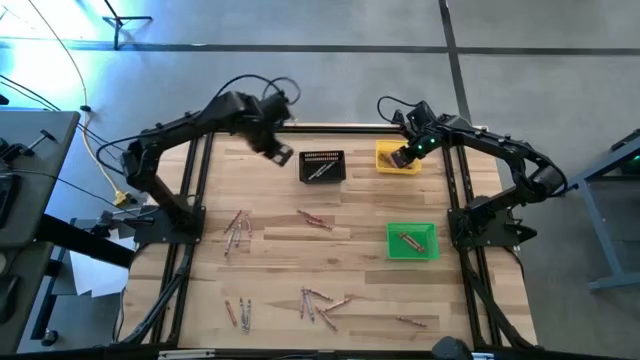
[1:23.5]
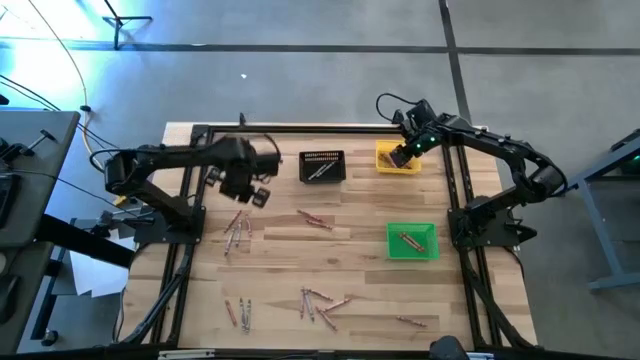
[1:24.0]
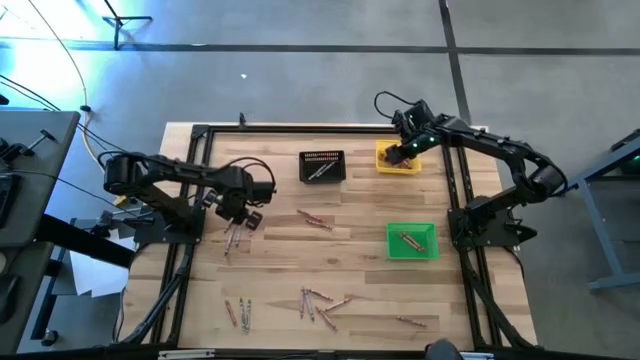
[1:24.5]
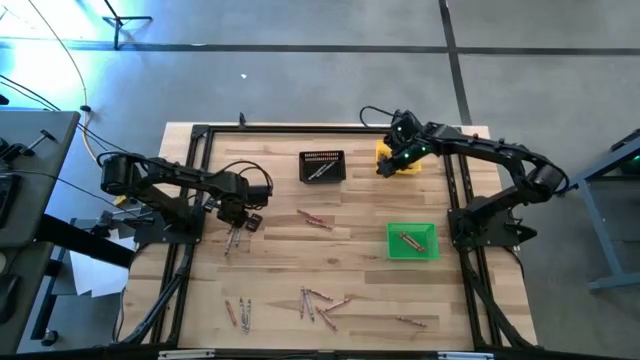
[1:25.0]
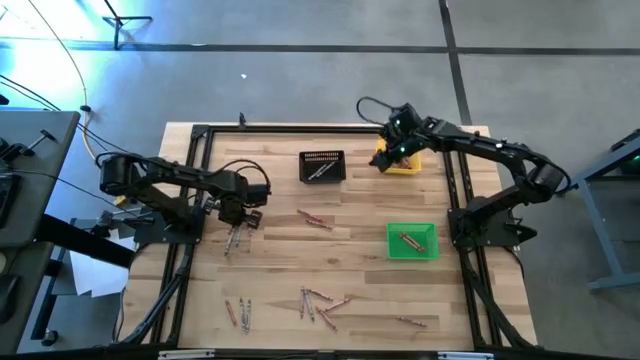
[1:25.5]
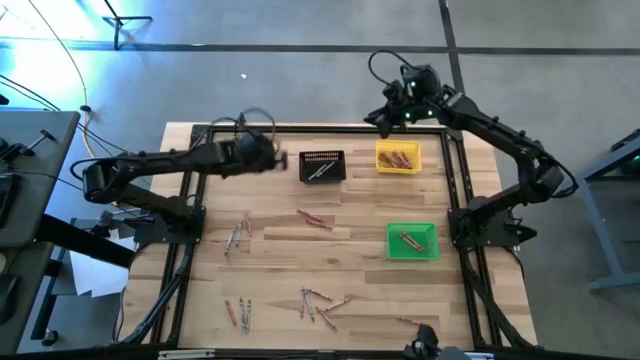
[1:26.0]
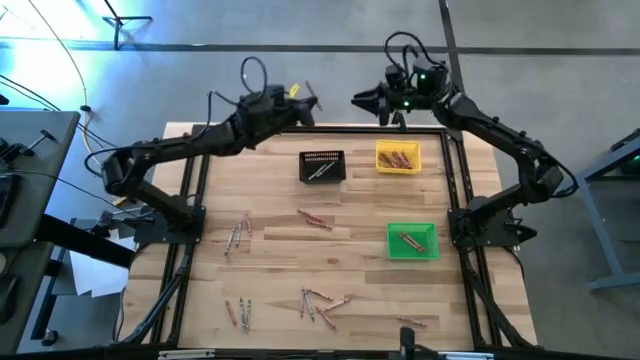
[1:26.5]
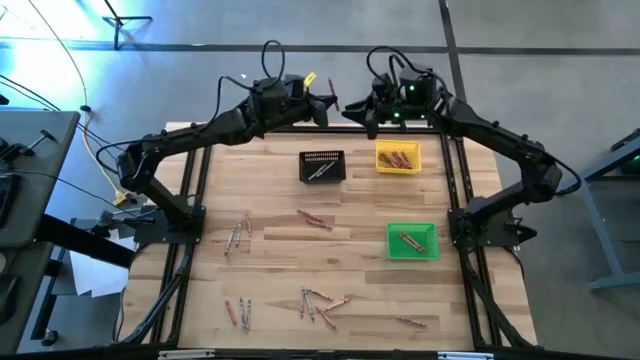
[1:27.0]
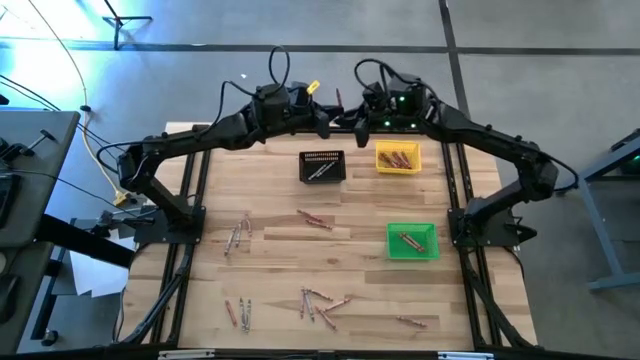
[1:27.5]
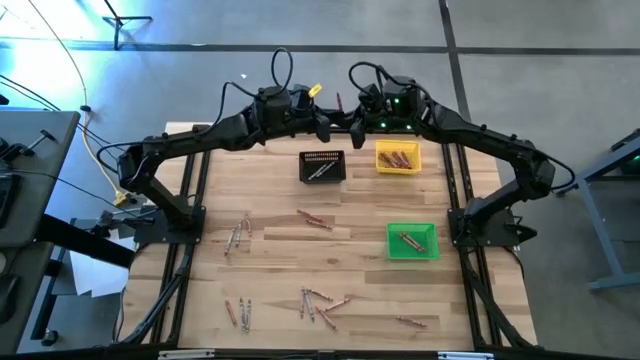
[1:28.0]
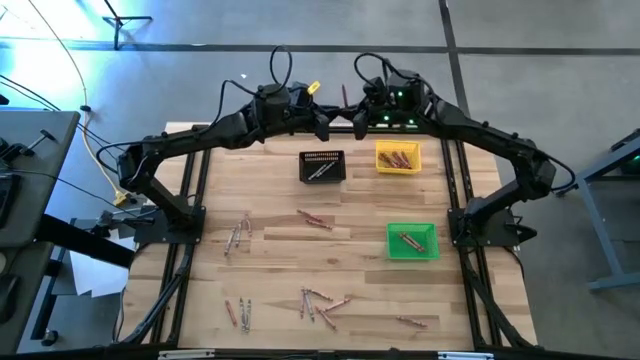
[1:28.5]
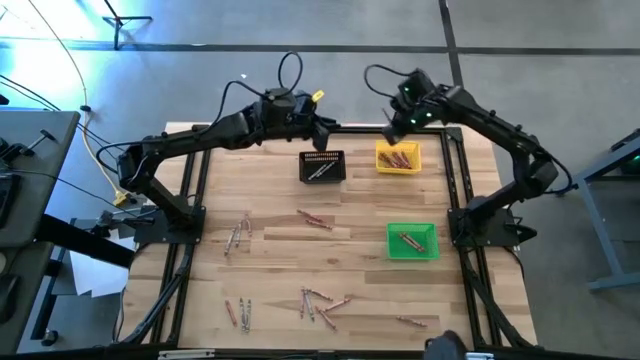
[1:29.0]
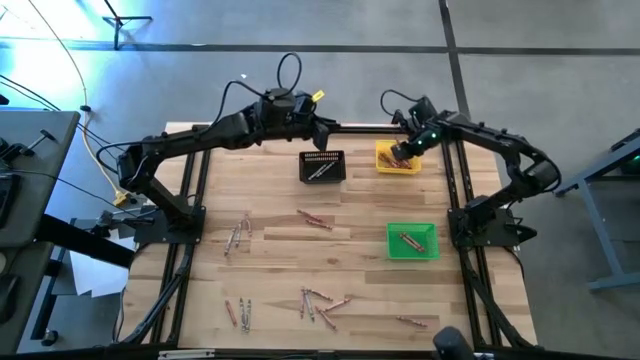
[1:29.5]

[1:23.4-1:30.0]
Task: Sort crayons
Put the red crayon into the yellow basket

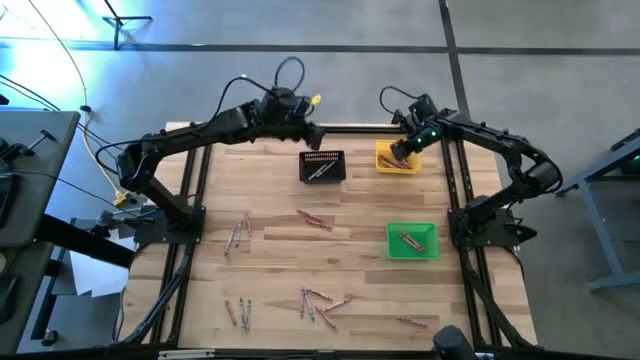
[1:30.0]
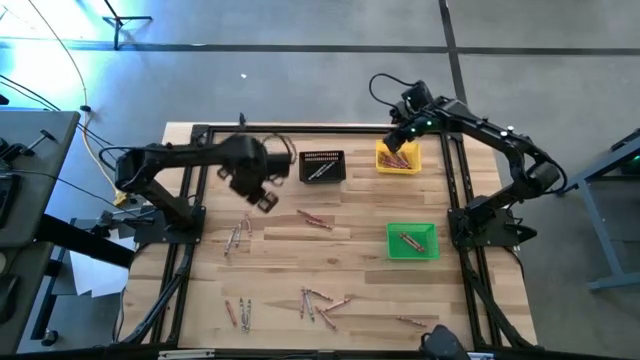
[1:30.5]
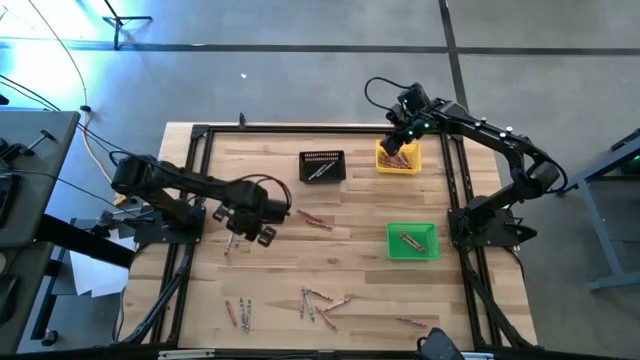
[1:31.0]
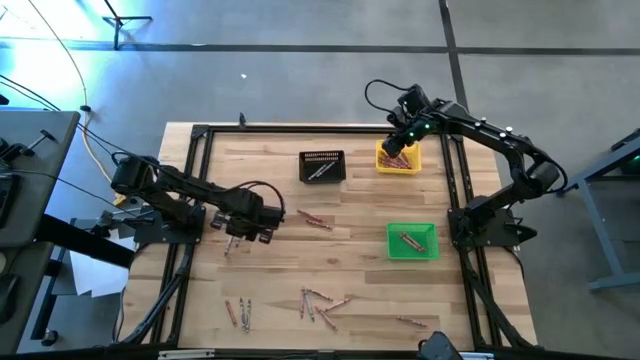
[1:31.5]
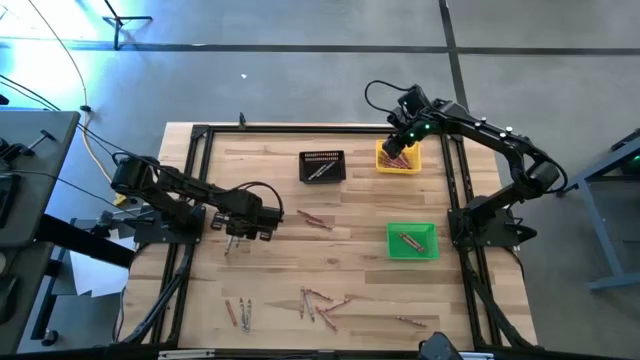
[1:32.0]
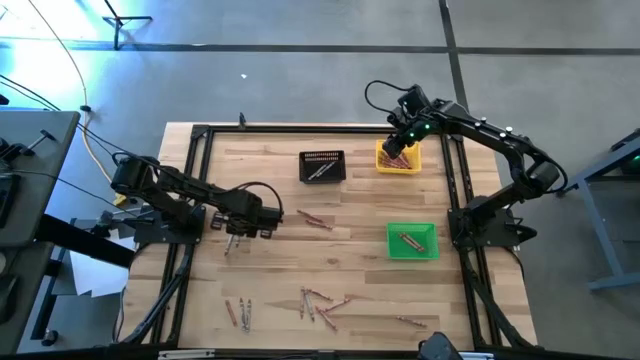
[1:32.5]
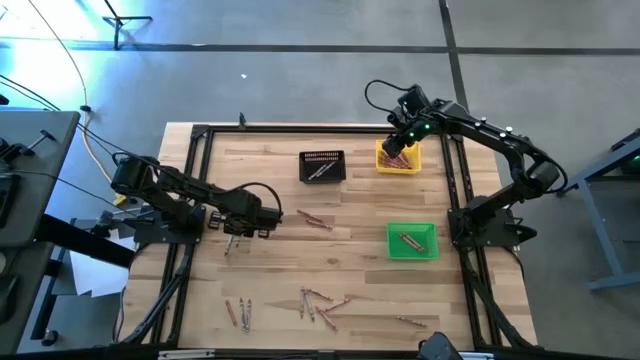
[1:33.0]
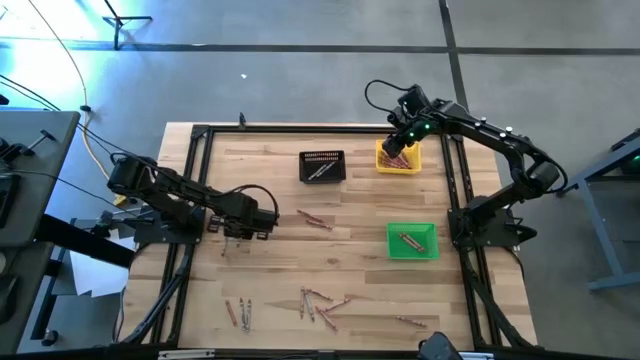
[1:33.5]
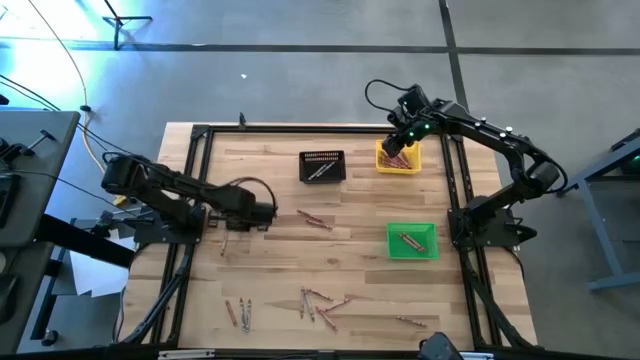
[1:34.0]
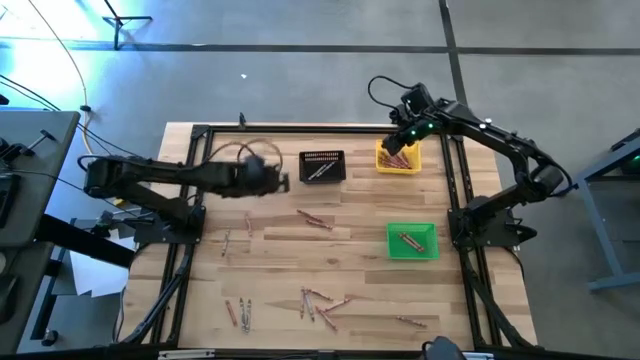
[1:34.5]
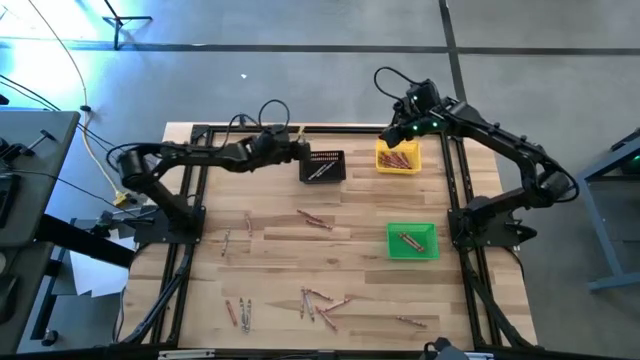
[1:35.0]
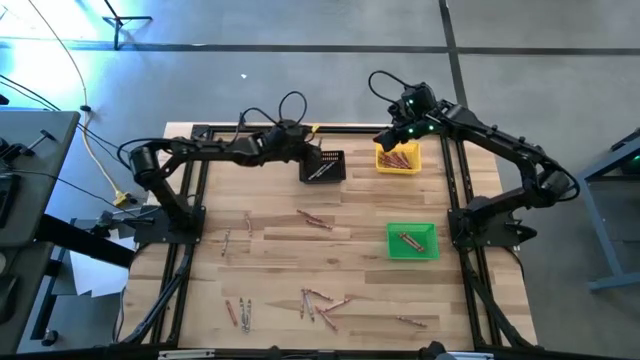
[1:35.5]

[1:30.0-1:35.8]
Put the gray crayon into the black basket

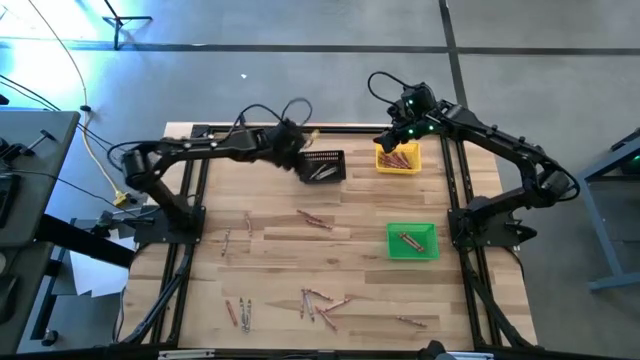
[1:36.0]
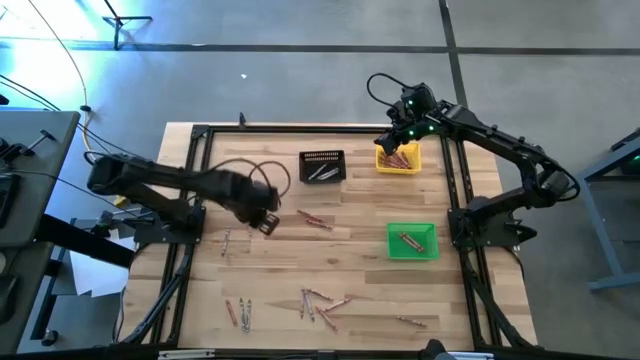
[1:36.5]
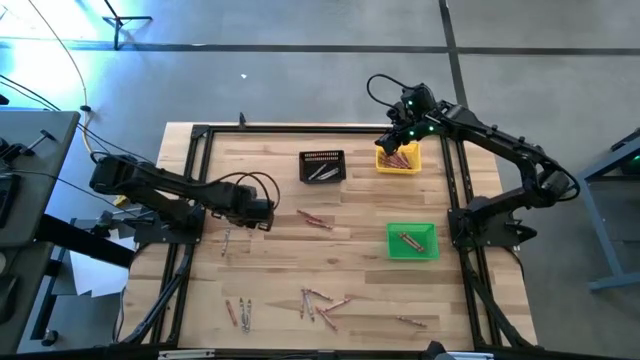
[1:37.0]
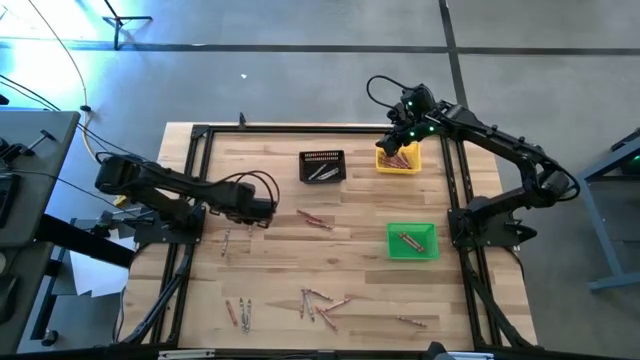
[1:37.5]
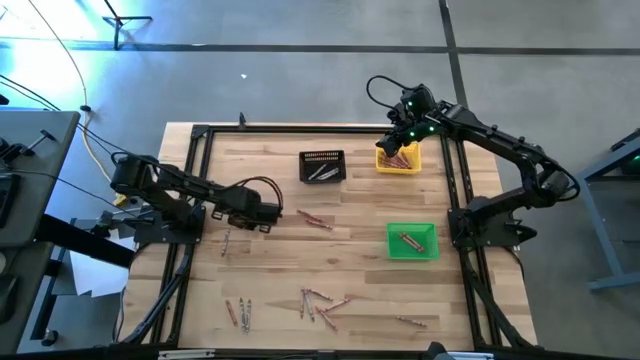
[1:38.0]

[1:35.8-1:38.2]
Put the pink crayon into the green basket

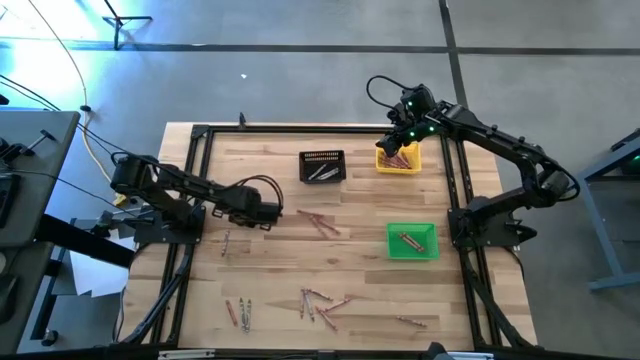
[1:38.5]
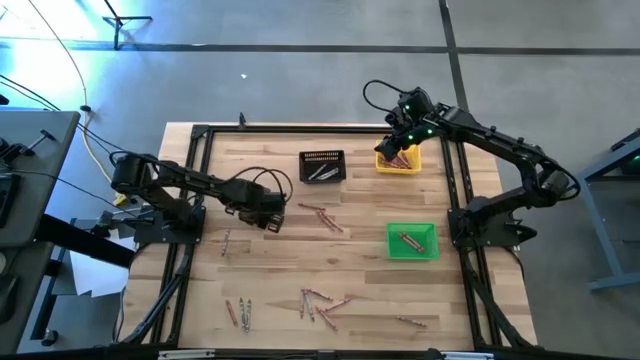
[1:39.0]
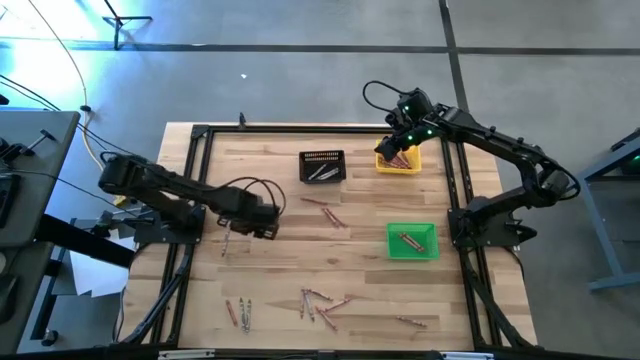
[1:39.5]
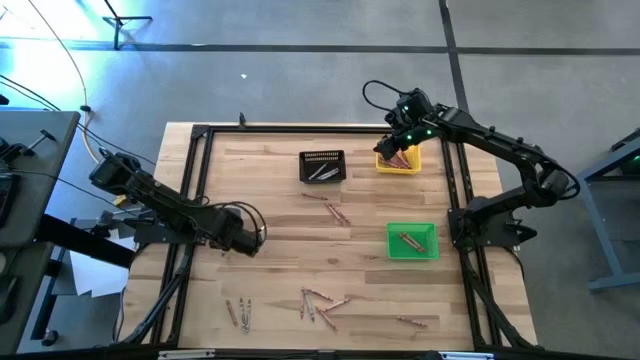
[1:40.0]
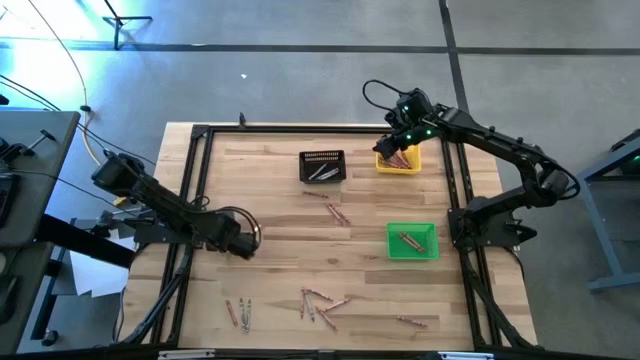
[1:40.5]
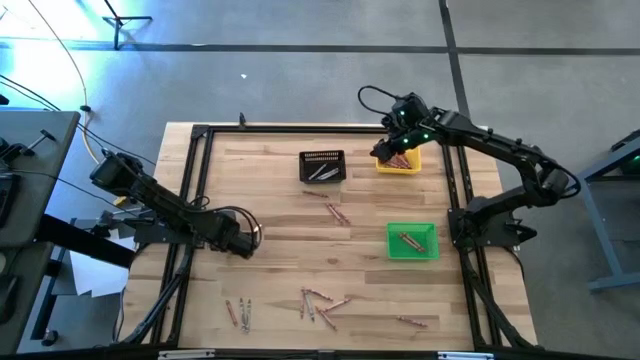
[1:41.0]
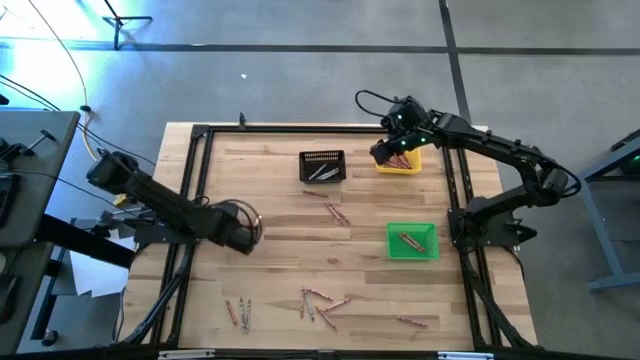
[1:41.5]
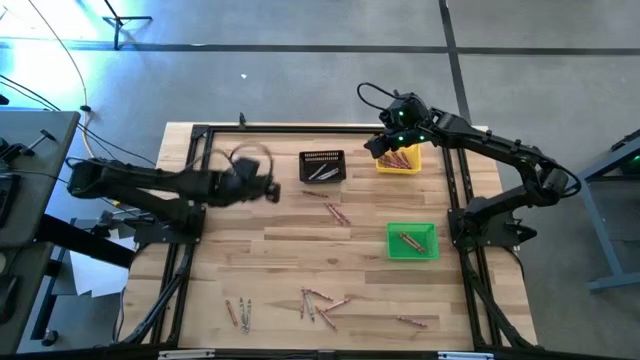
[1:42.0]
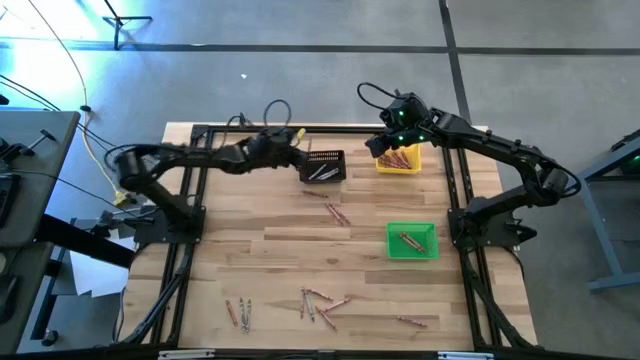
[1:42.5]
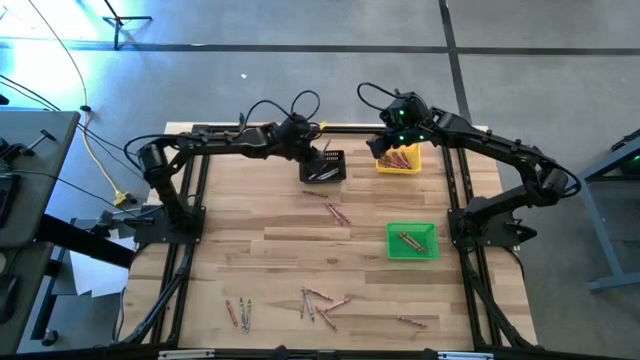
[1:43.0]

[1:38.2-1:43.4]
Put the gray crayon into the black basket

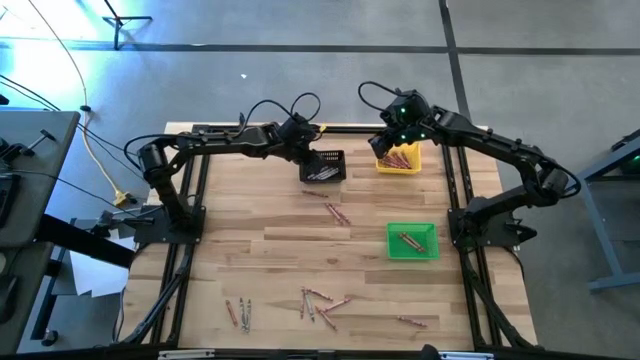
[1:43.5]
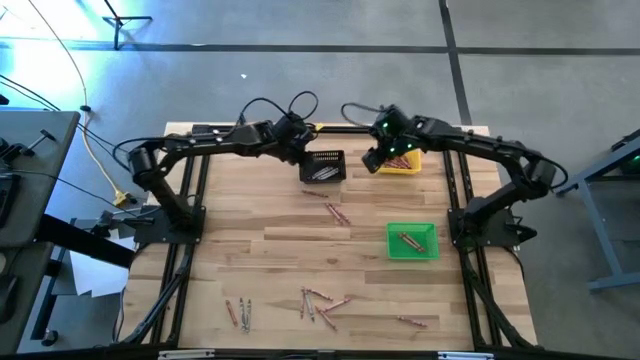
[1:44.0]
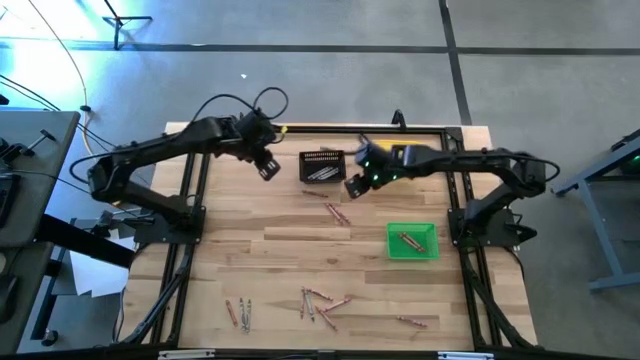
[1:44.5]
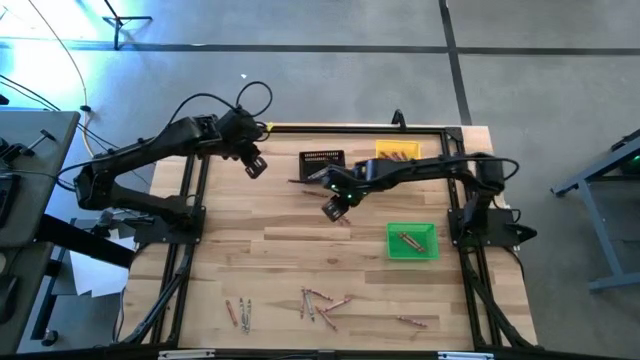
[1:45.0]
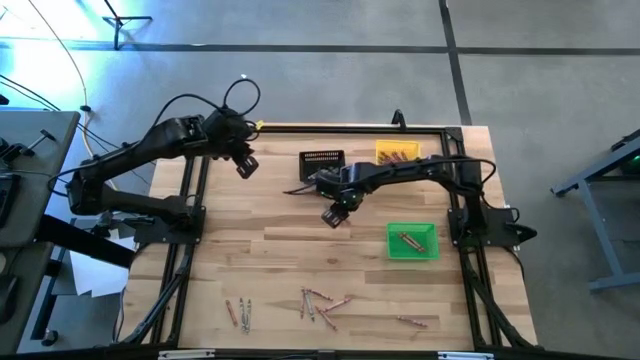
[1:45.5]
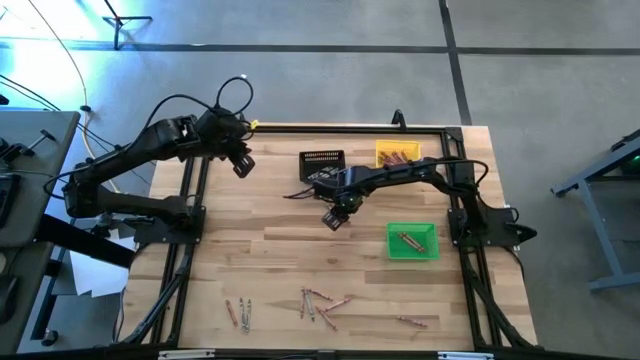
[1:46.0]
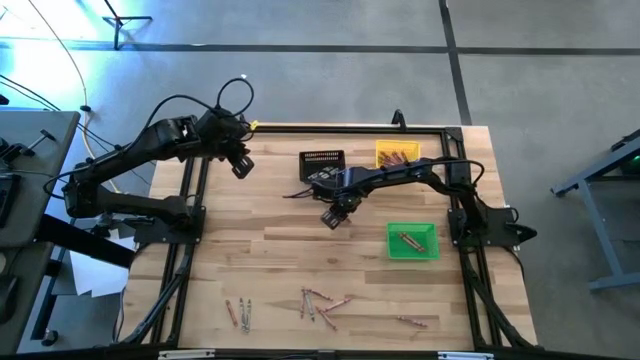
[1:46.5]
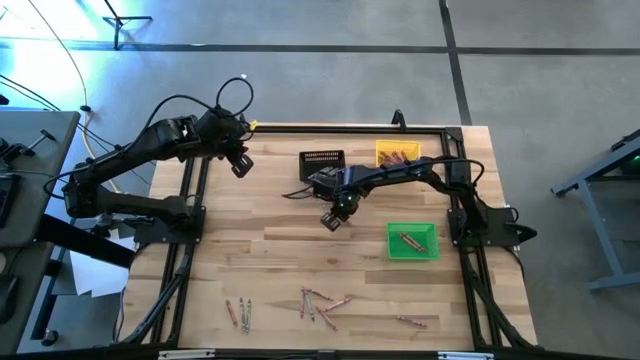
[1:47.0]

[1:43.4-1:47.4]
Put the red crayon into the yellow basket
